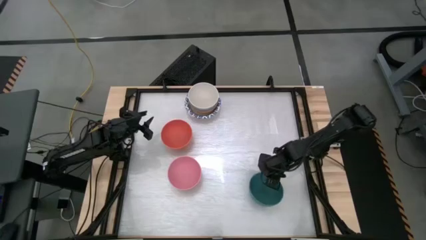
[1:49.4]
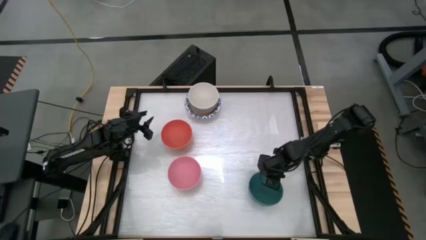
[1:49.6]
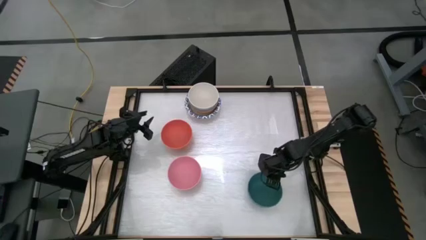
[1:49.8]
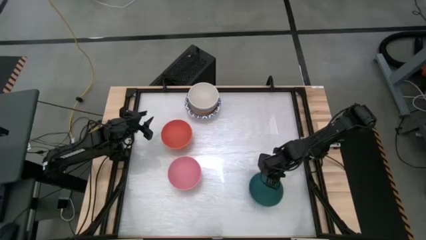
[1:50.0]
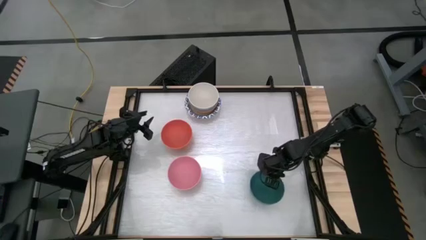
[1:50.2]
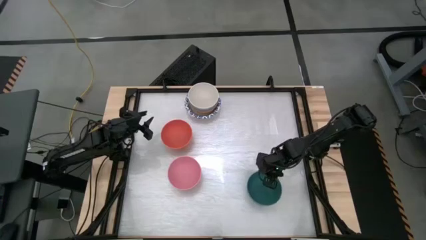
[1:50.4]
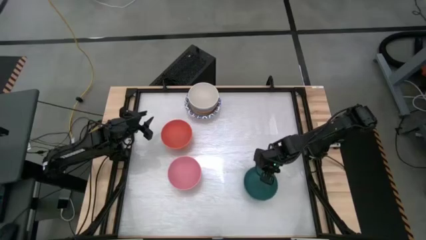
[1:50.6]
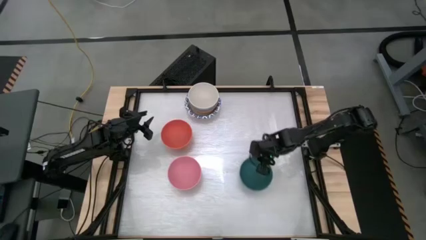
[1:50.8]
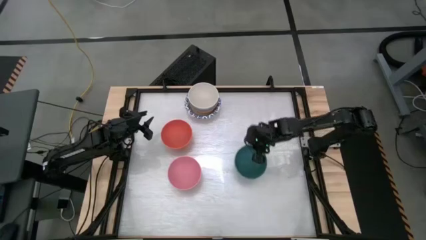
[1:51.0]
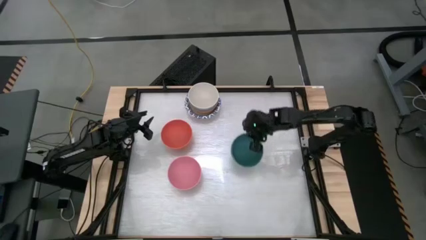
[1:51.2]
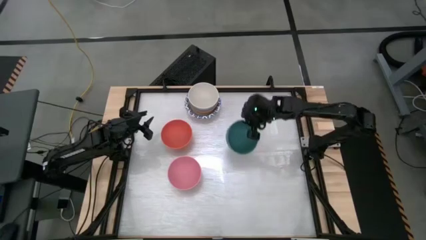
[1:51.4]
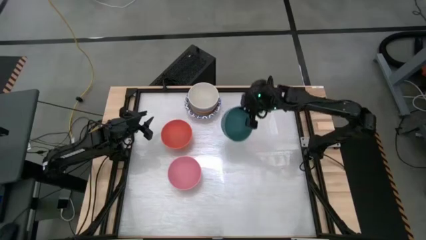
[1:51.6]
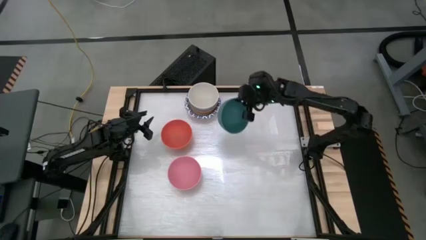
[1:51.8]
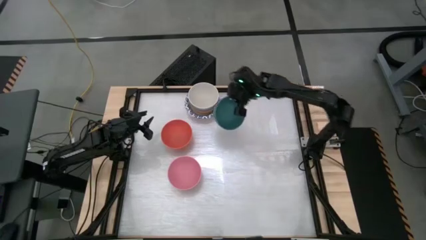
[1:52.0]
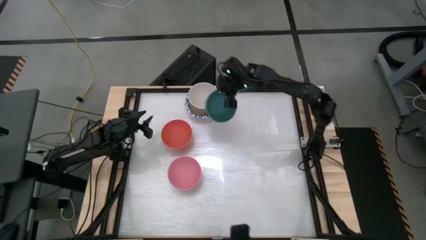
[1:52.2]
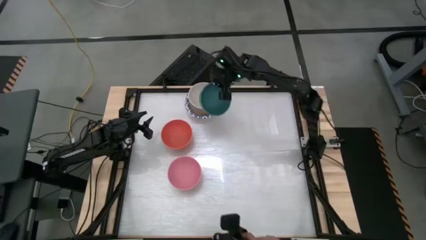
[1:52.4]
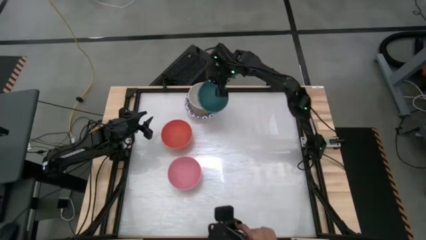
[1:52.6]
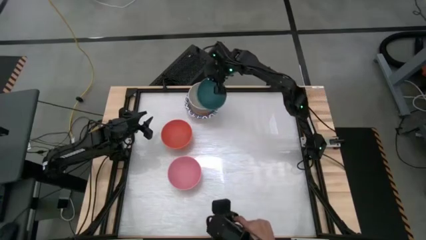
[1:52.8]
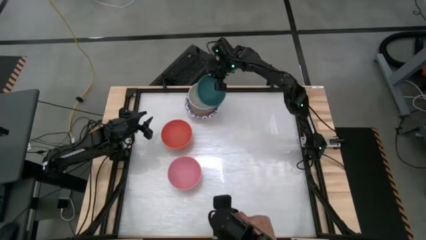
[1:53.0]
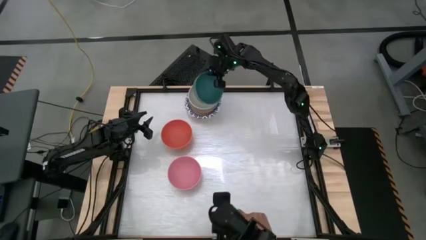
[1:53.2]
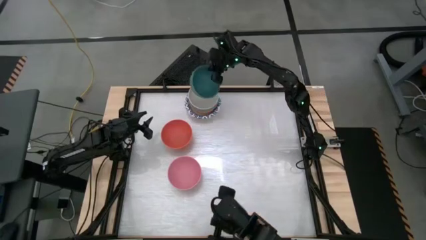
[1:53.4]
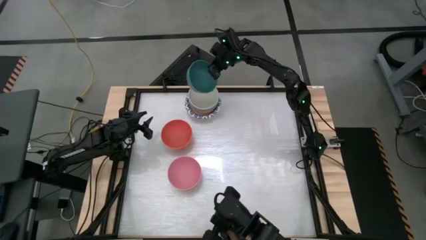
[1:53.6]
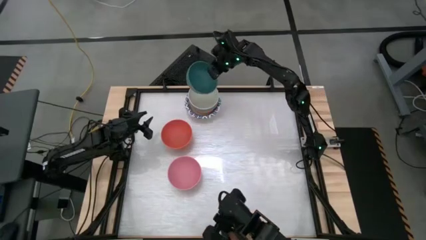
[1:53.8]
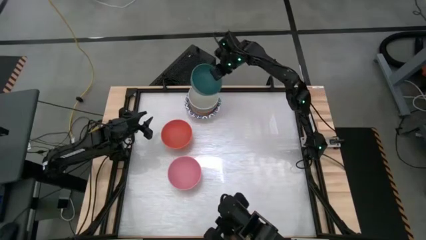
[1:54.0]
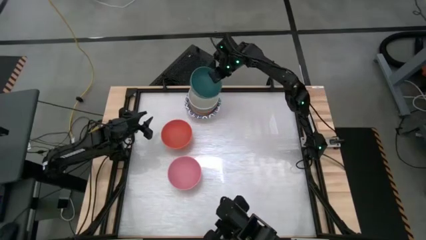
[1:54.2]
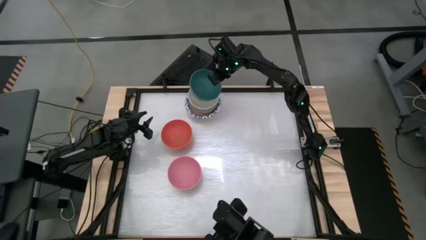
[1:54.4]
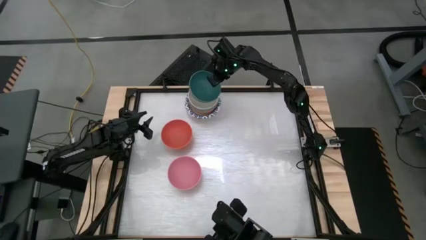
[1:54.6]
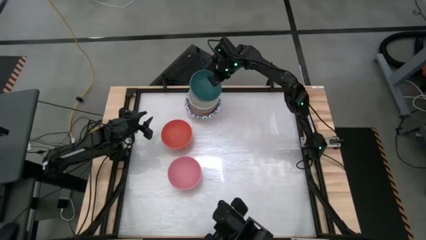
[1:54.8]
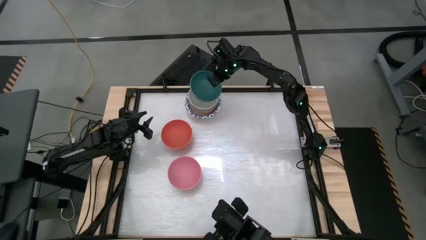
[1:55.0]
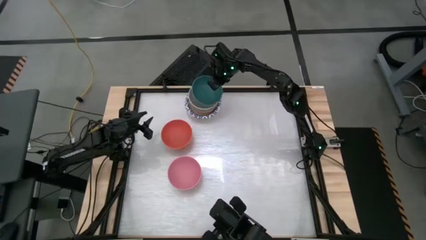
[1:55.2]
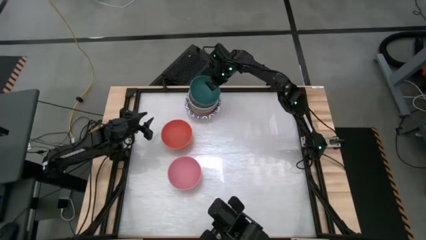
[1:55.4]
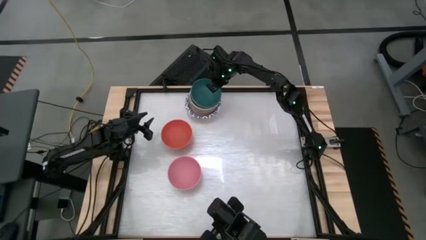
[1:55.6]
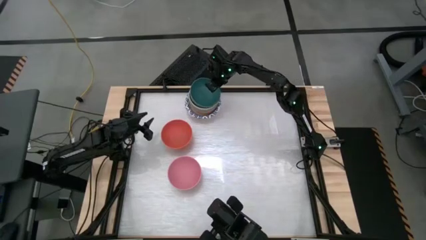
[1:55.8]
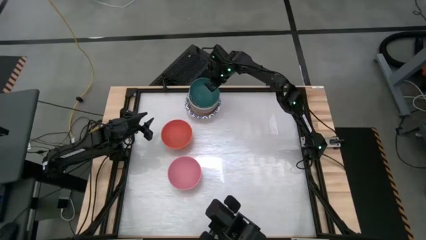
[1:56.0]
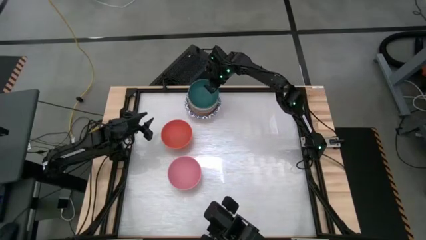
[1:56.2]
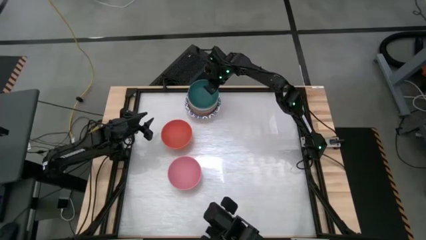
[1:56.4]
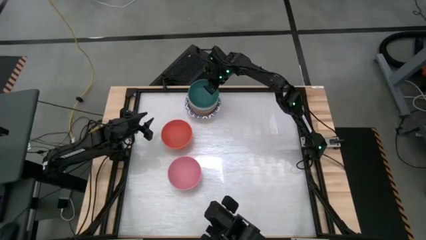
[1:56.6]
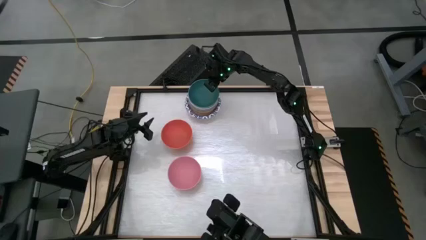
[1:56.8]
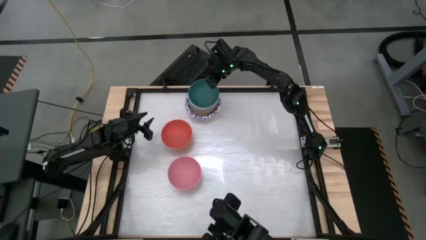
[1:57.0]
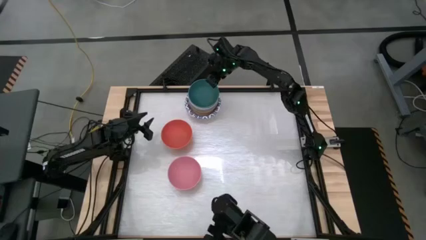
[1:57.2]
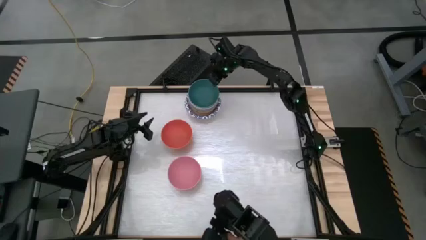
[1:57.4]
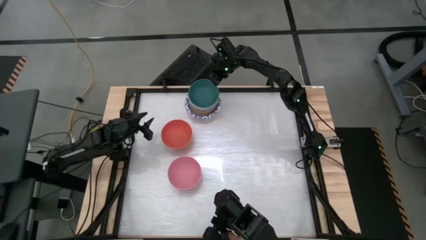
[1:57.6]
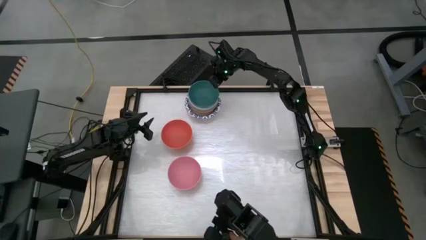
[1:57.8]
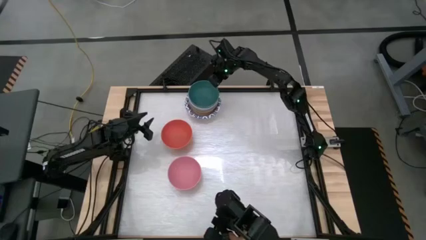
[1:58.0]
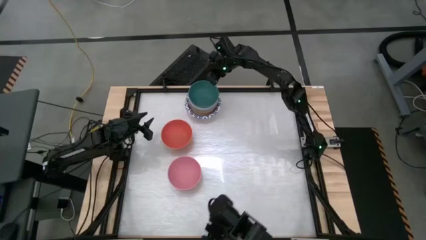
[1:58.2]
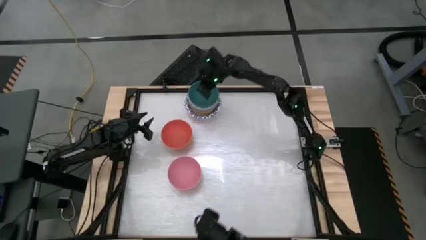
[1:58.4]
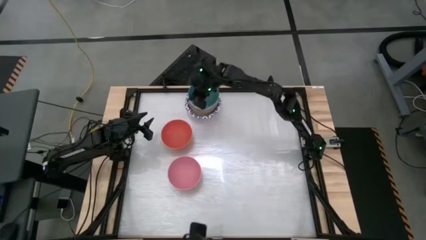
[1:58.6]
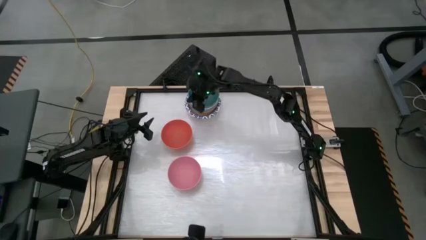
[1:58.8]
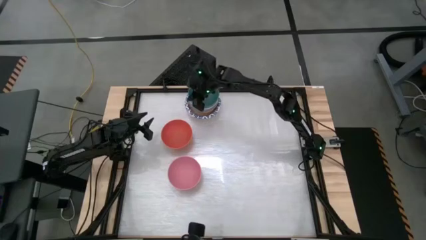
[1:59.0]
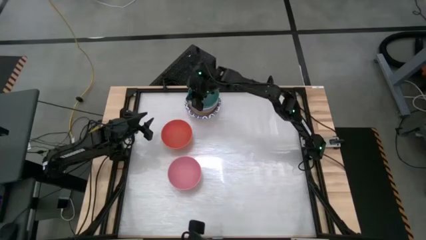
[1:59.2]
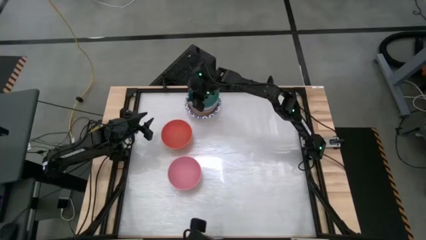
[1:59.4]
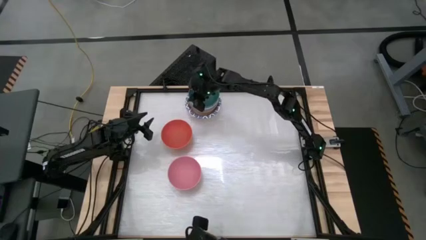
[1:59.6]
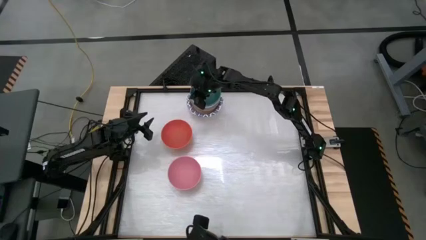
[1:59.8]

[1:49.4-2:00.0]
Stack the green bowl onto the stack of bowls
